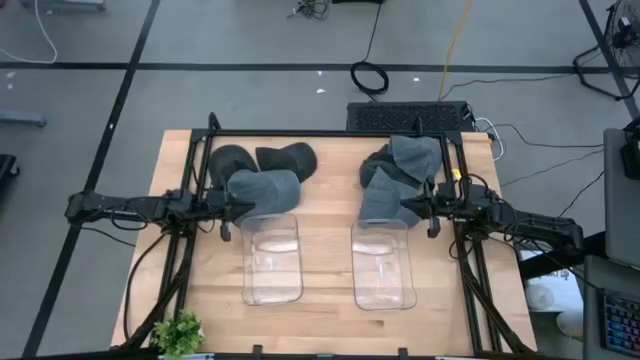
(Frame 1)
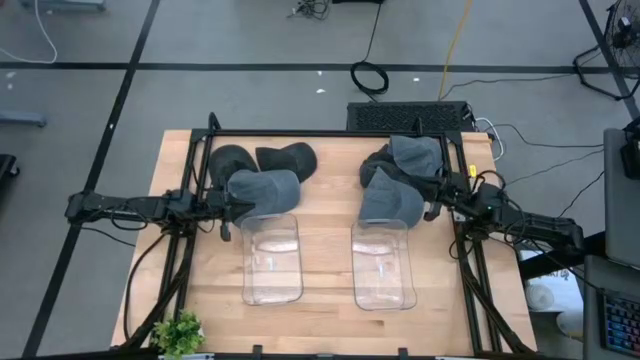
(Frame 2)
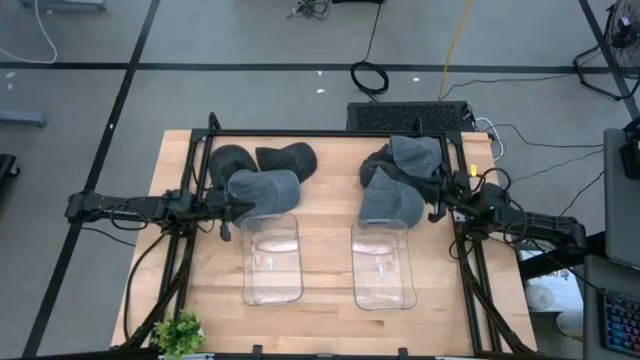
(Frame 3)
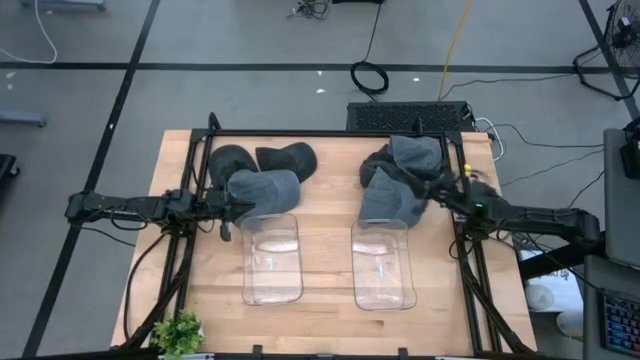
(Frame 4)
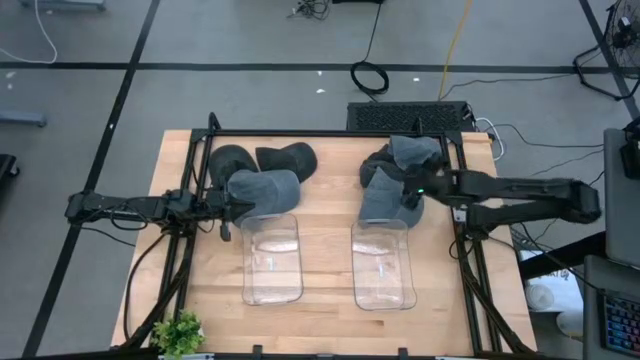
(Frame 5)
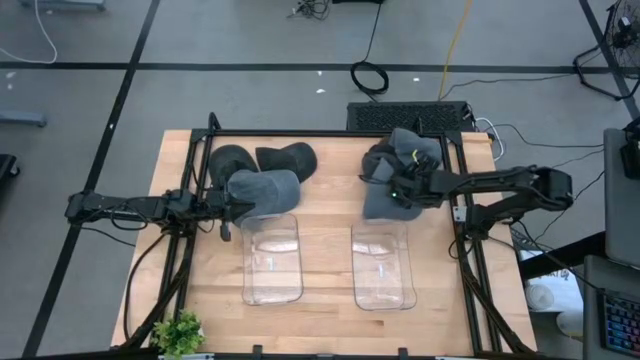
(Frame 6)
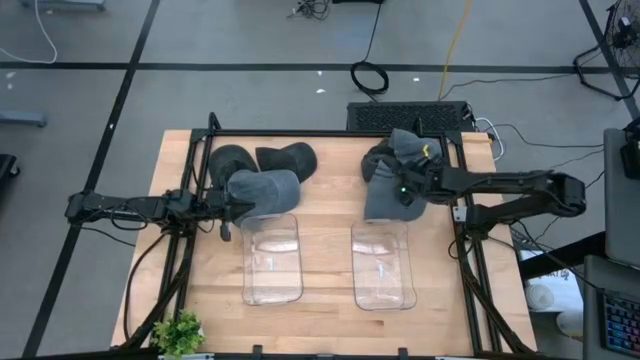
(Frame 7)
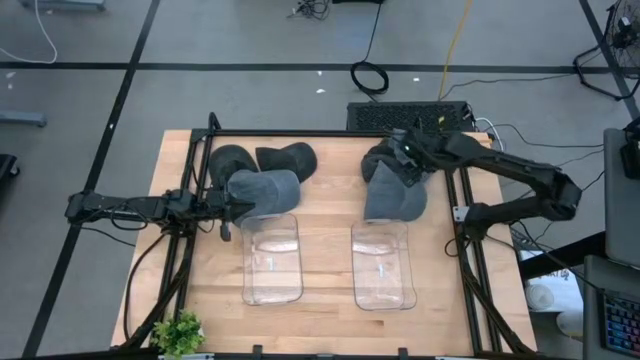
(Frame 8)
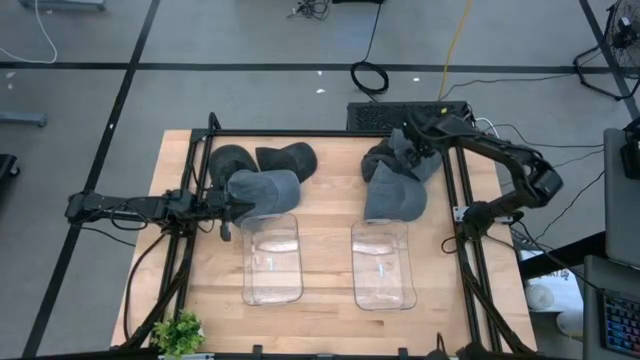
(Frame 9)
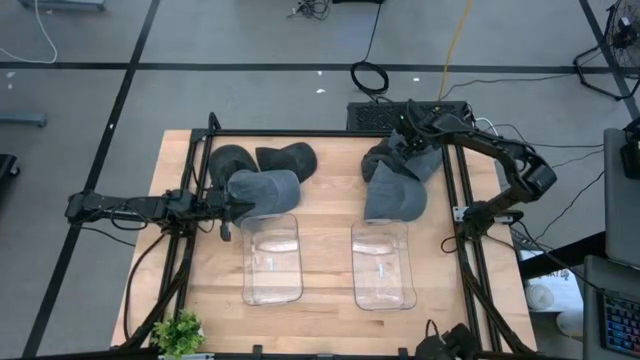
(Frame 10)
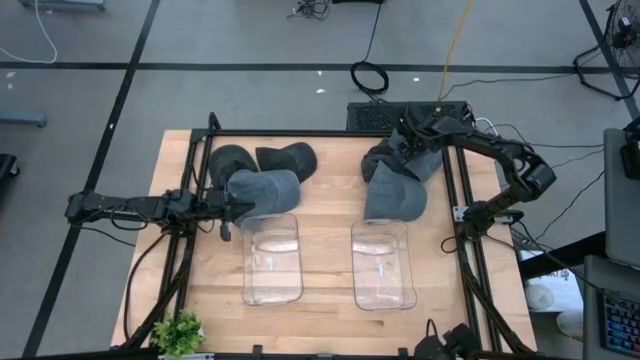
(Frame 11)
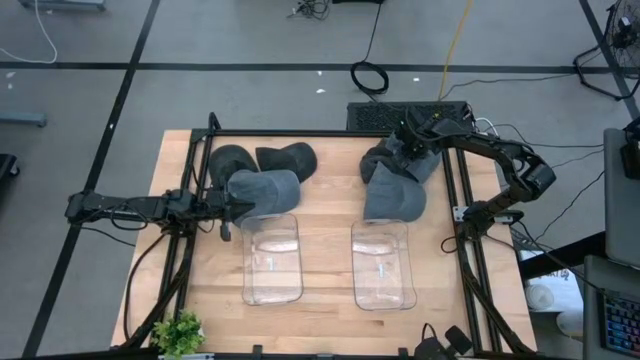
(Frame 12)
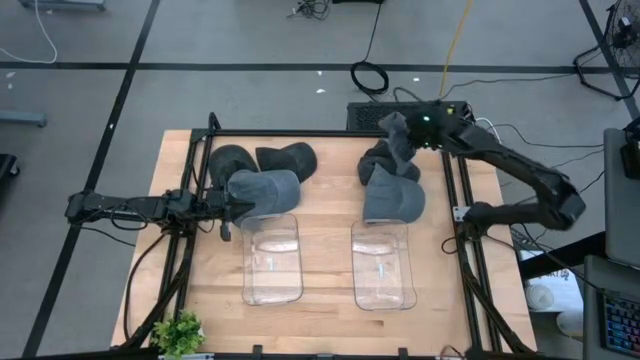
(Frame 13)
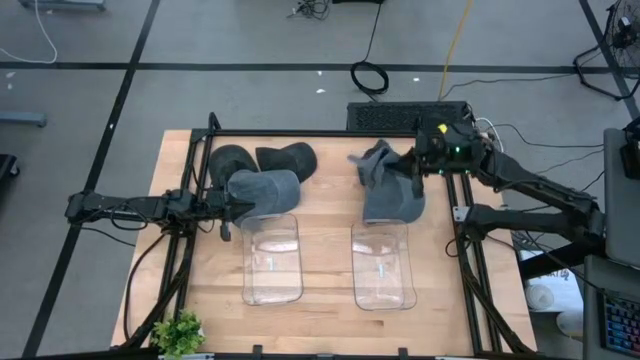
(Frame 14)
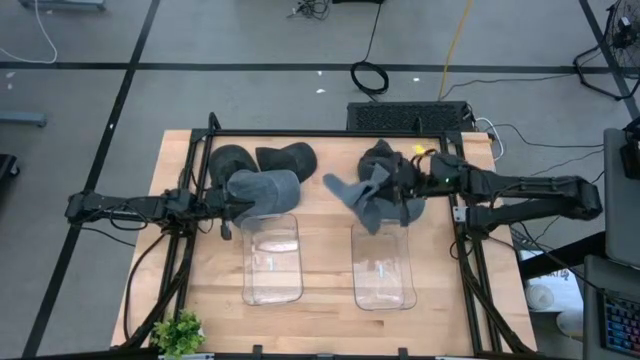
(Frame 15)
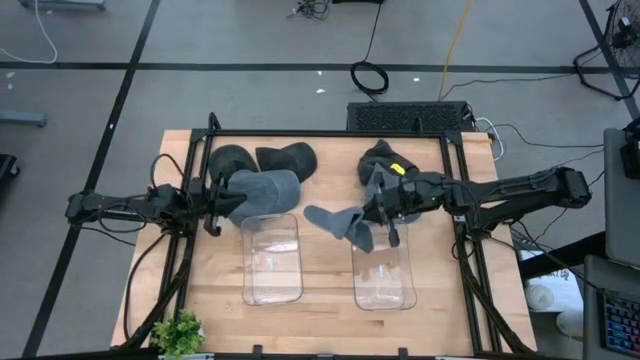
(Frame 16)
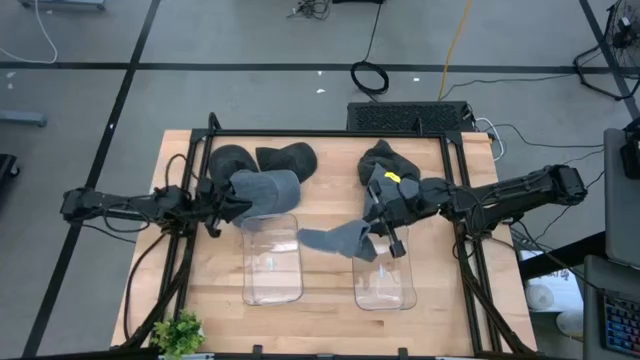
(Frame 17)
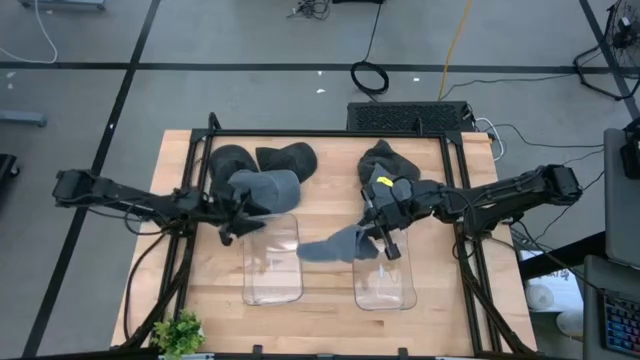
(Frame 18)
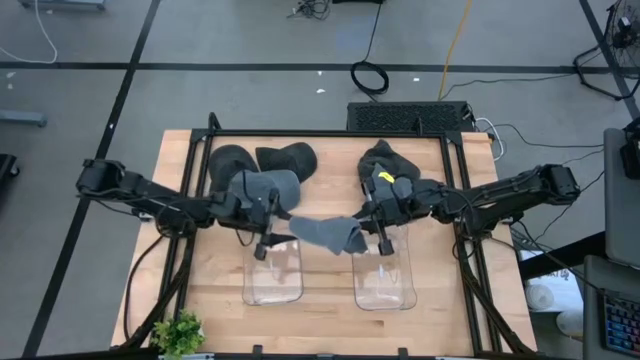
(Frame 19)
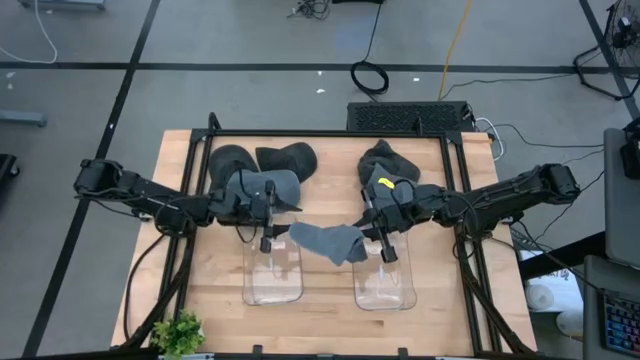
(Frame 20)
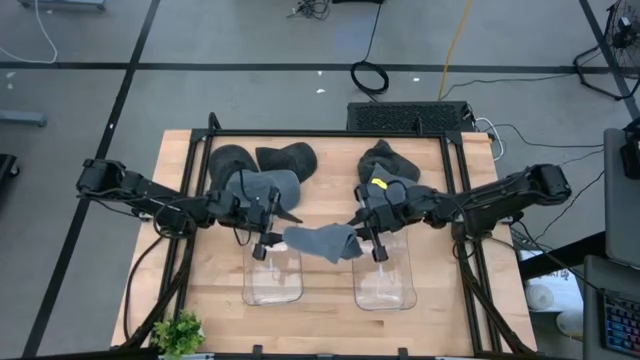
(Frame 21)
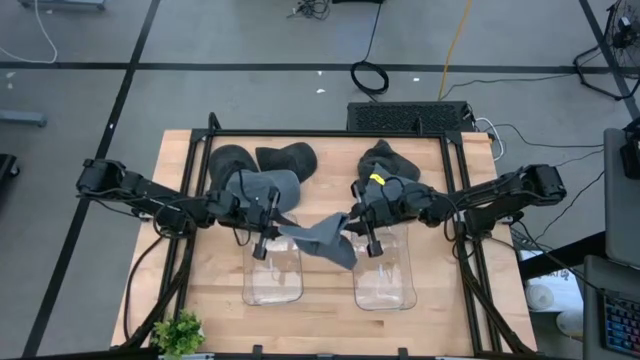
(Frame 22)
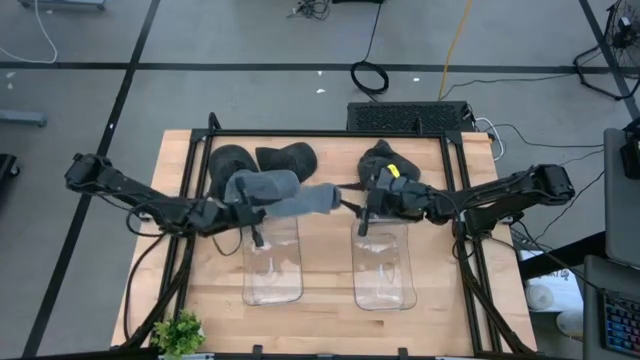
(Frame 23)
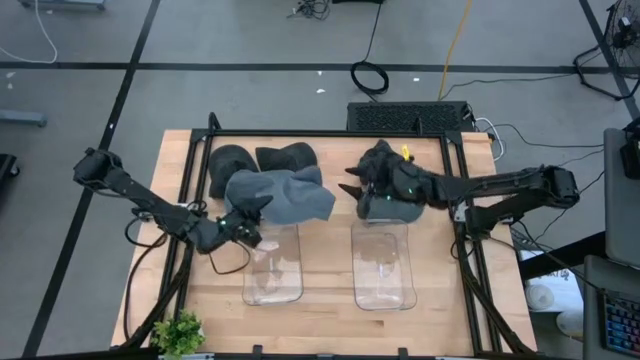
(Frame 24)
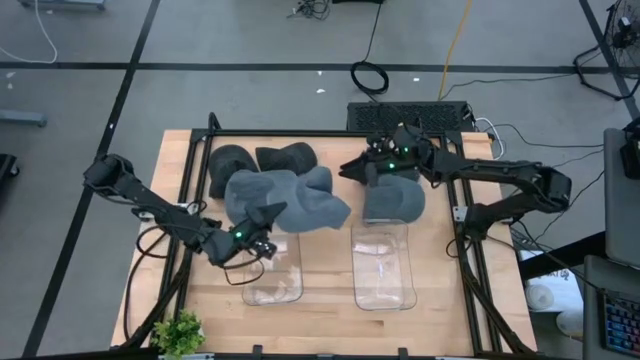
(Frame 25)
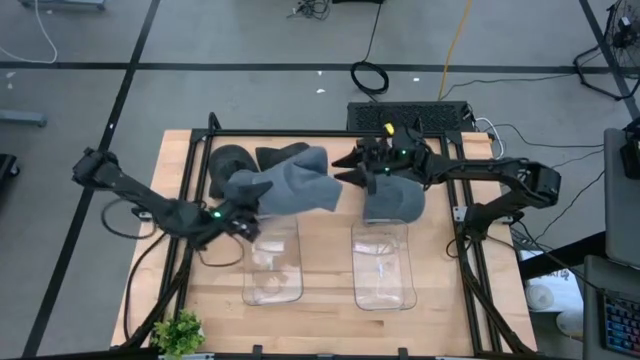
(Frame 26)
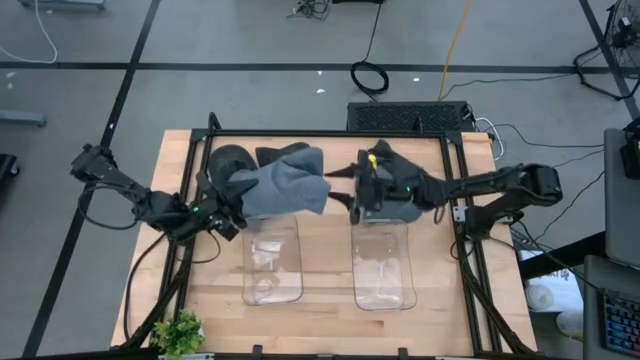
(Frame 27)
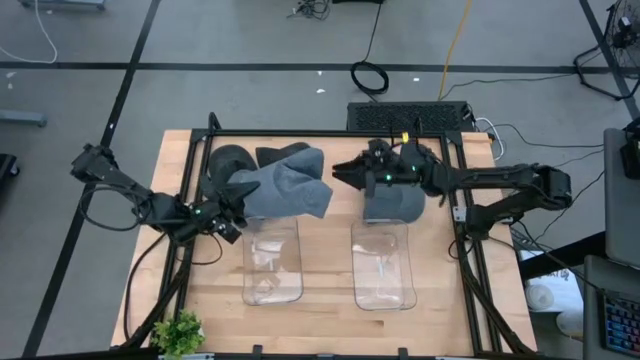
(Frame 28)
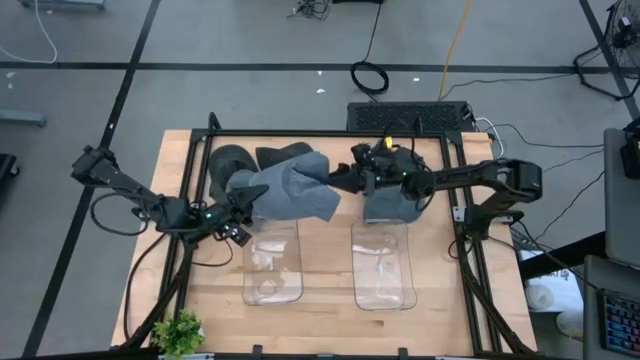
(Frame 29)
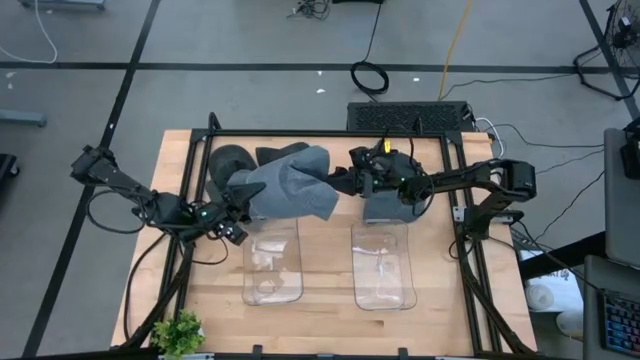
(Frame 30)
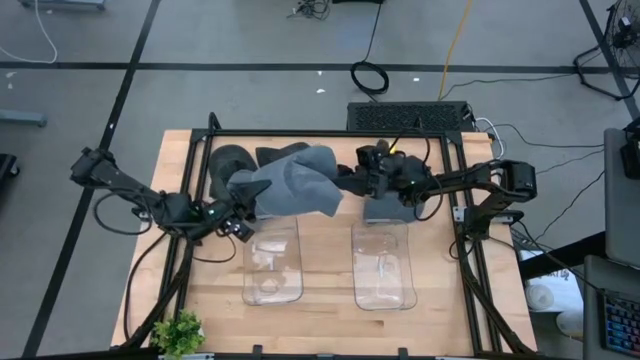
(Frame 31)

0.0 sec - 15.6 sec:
Task: Pick & Place hat
Put the top gray cap into the left transparent bin
